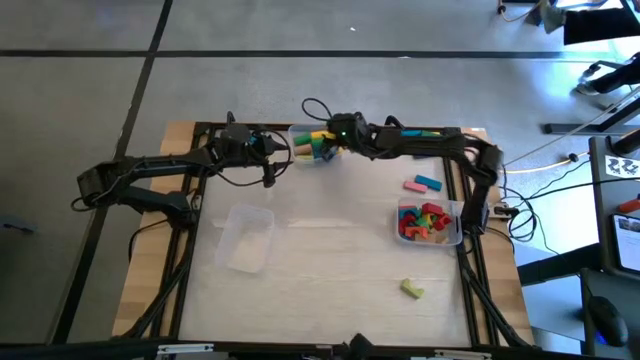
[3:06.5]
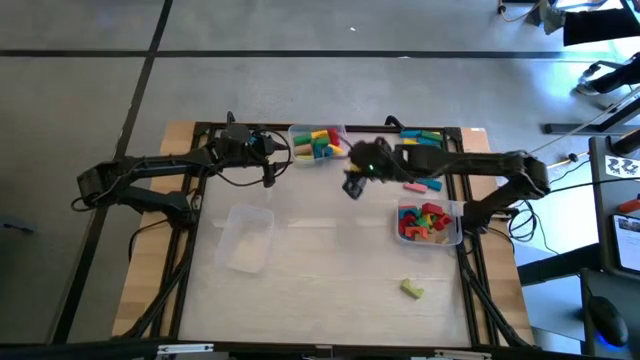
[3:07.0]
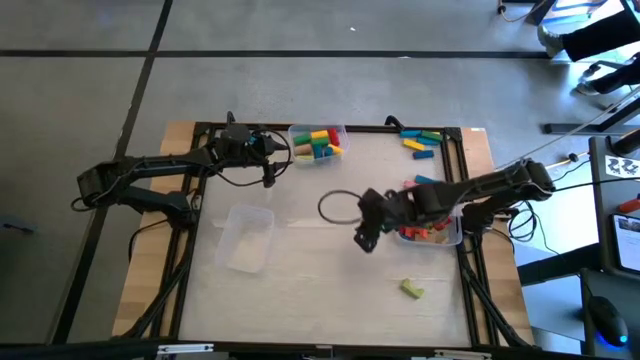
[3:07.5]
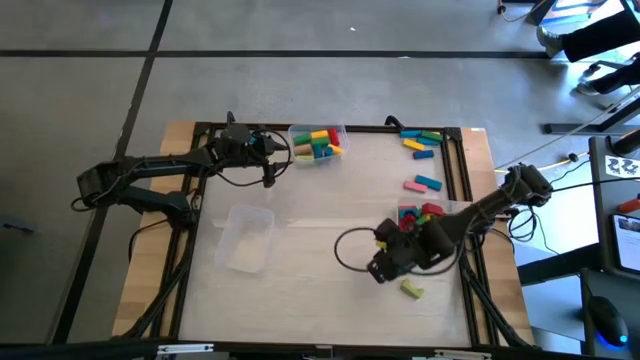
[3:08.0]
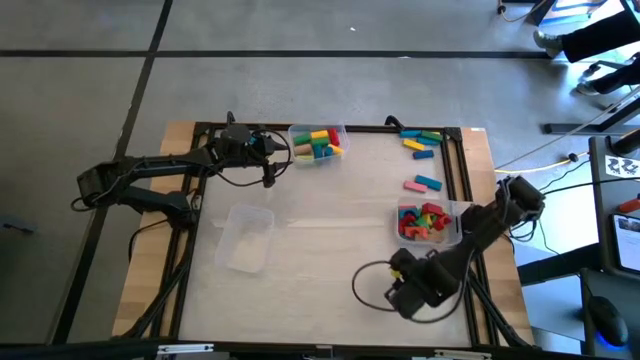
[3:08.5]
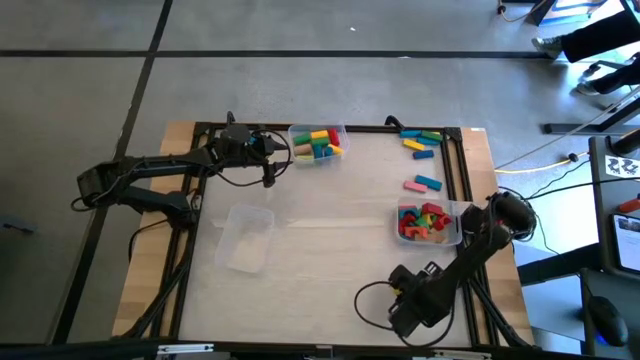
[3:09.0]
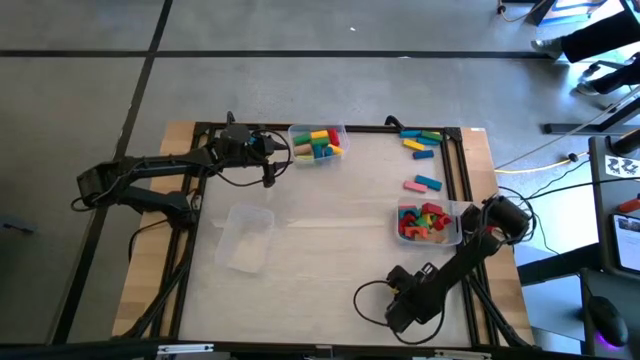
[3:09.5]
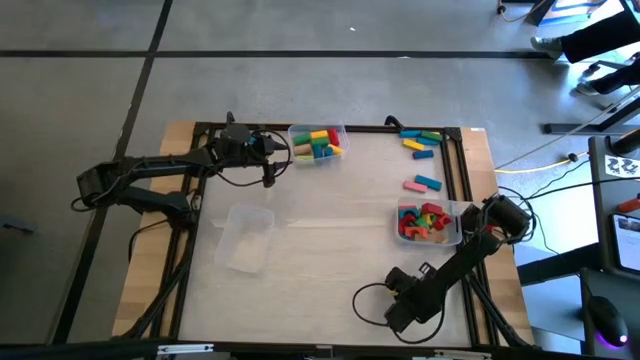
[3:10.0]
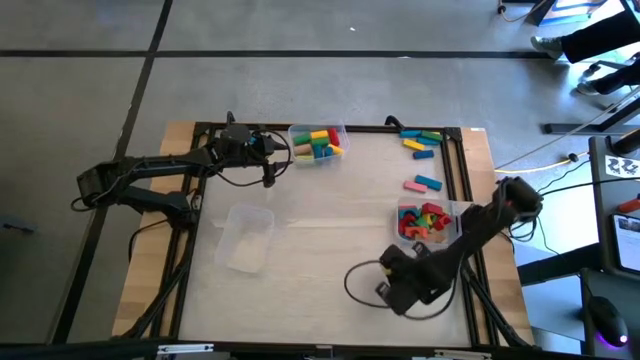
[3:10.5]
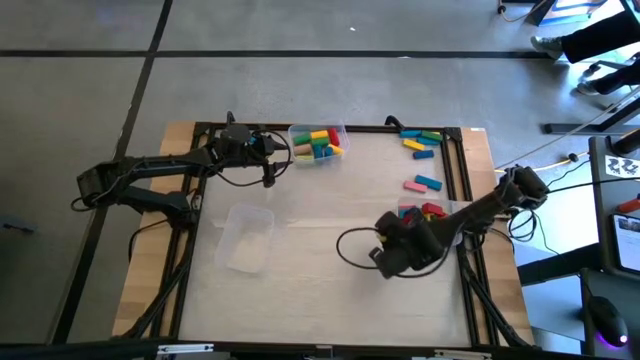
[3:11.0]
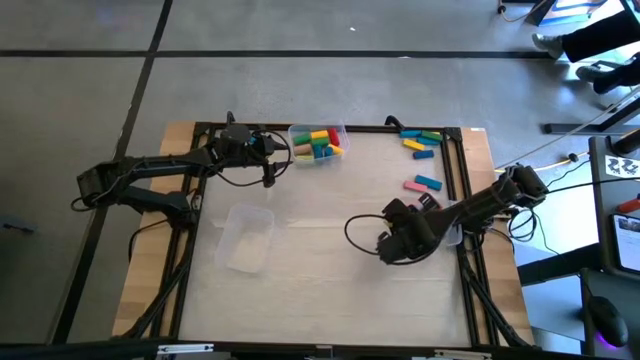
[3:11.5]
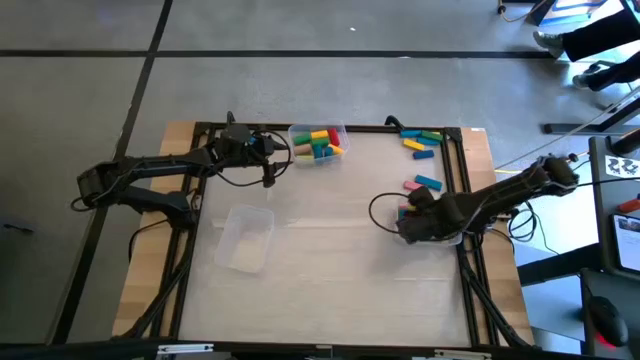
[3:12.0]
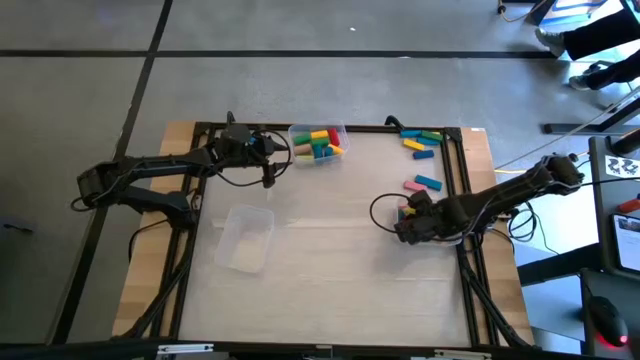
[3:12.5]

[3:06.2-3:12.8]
Task: Sort blocks by size
Put the light green arch block into the bottom right transparent bin

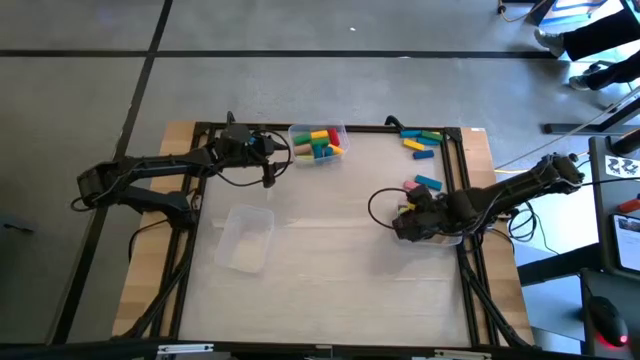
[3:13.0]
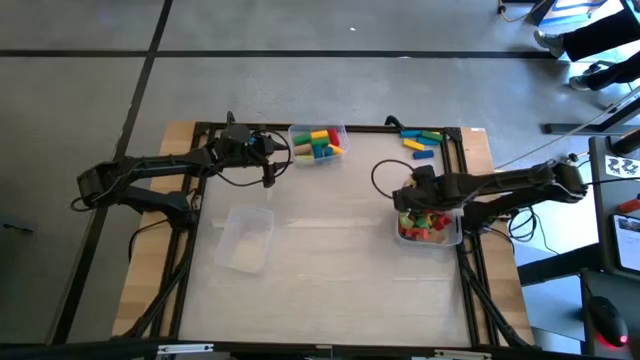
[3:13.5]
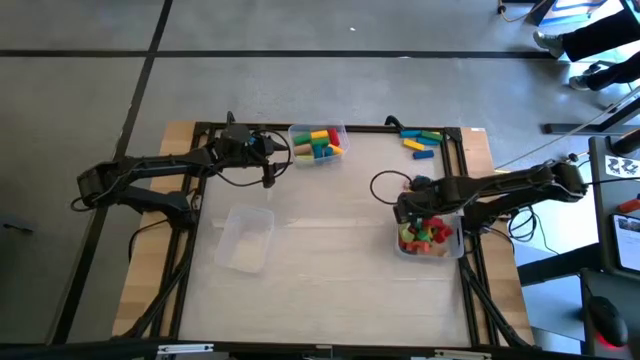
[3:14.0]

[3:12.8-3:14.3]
Adjust the bottom right transparent bin

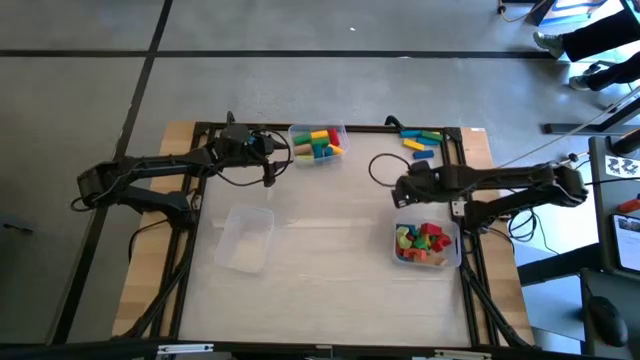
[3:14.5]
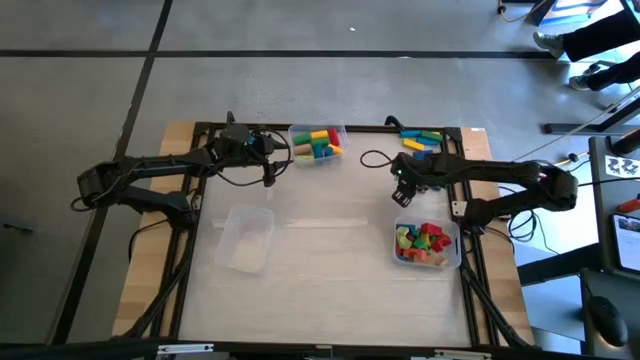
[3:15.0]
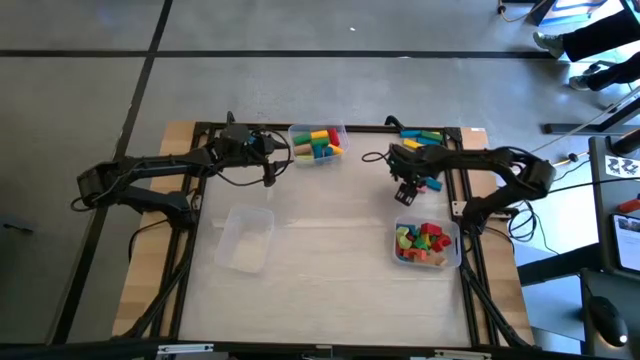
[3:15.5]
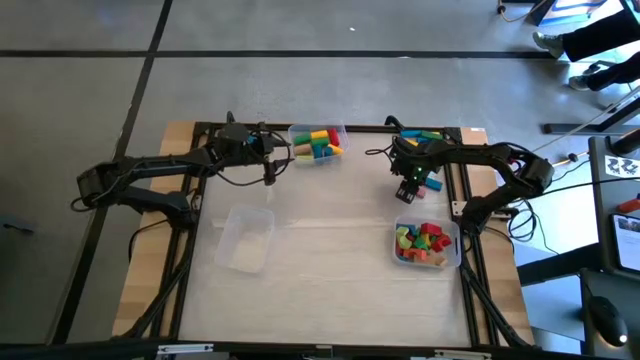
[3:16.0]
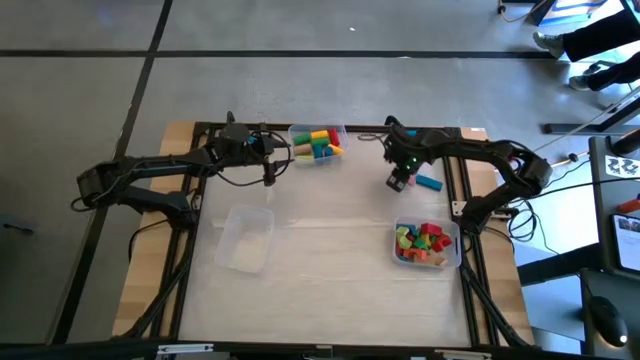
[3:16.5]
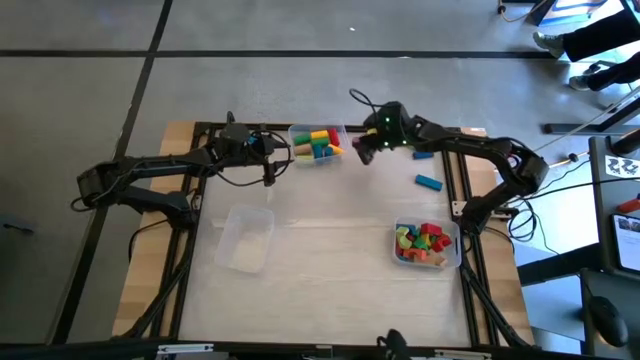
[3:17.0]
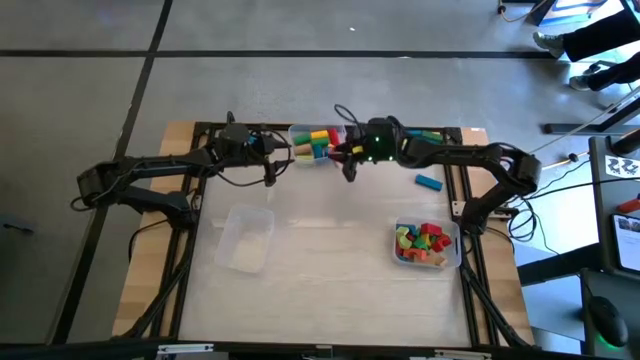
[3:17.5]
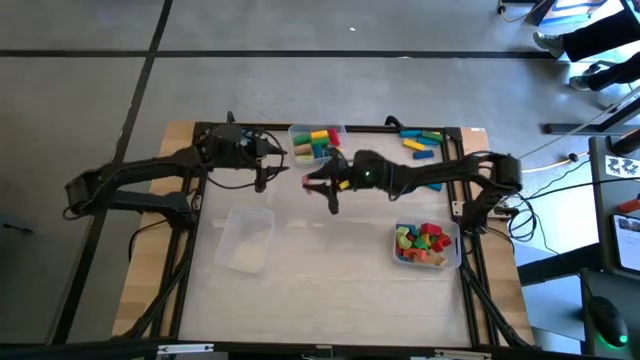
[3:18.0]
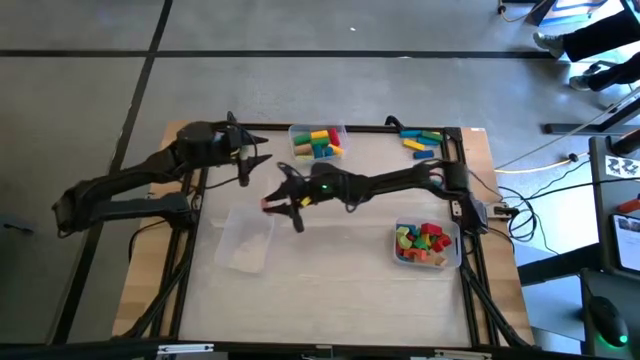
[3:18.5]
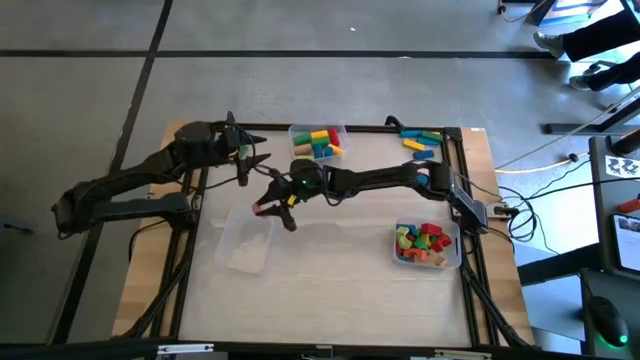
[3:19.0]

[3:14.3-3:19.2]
Put the pink rectangular block into the bottom left transparent bin

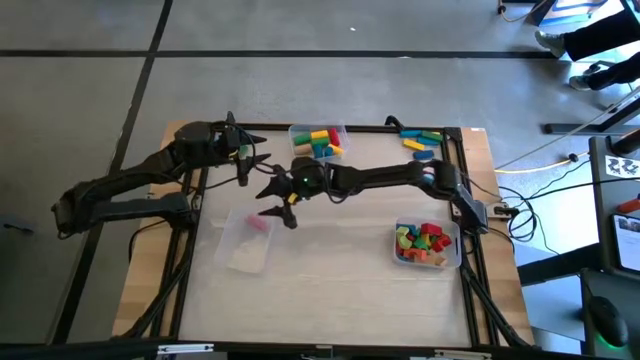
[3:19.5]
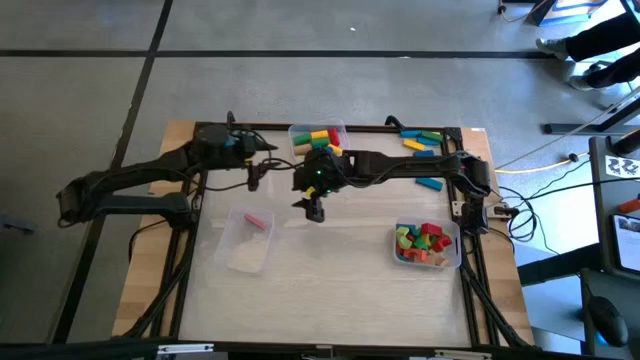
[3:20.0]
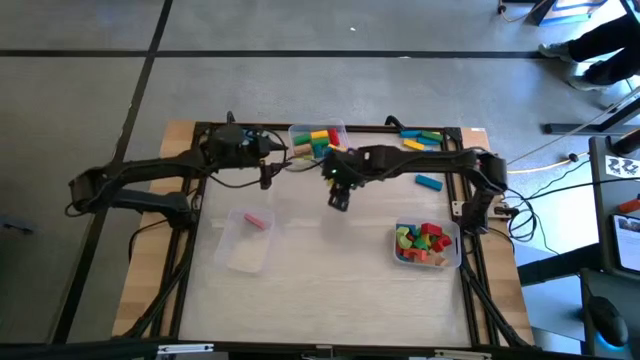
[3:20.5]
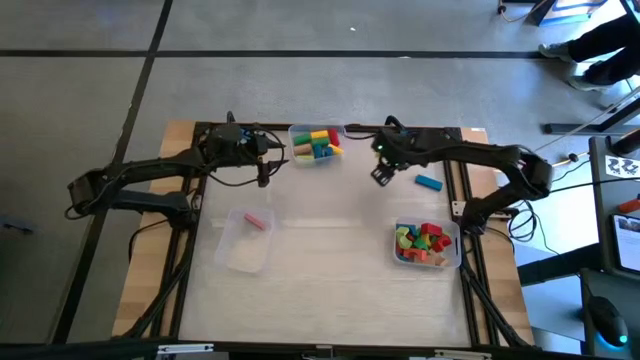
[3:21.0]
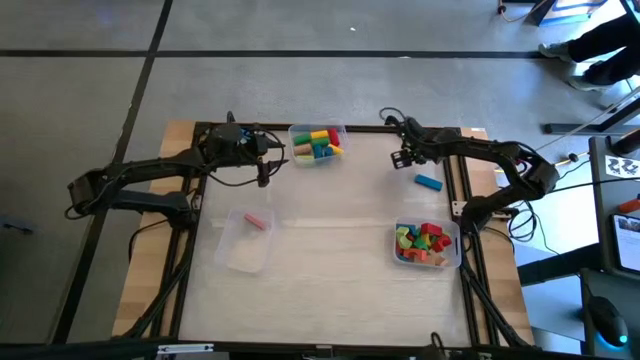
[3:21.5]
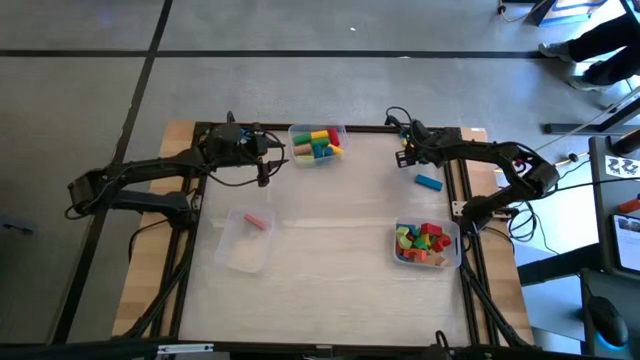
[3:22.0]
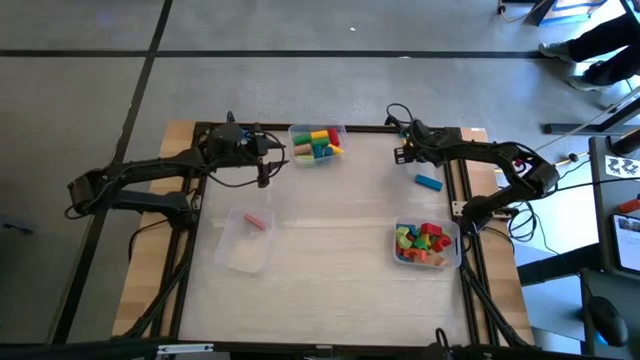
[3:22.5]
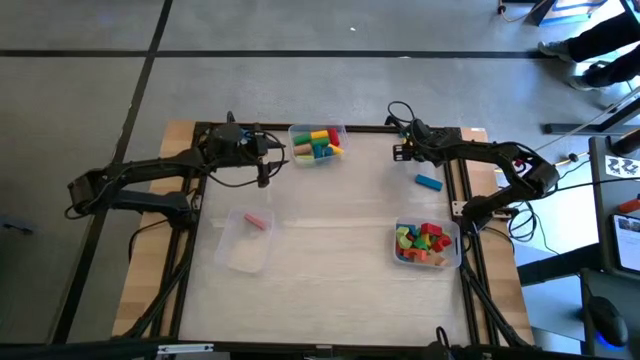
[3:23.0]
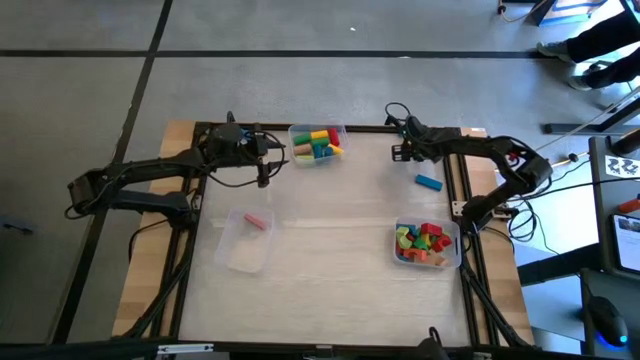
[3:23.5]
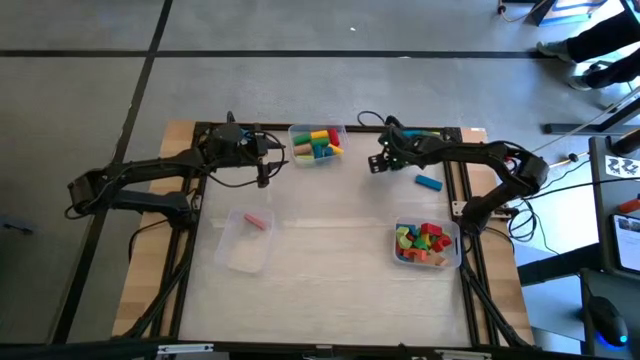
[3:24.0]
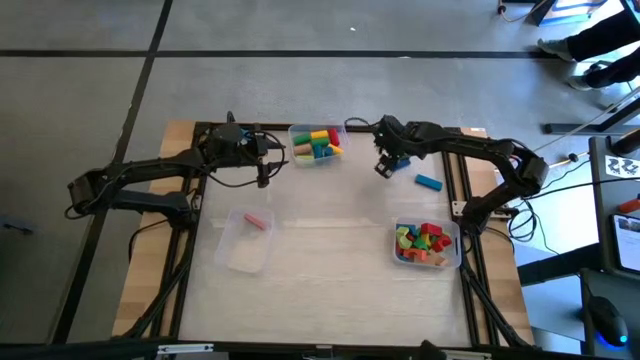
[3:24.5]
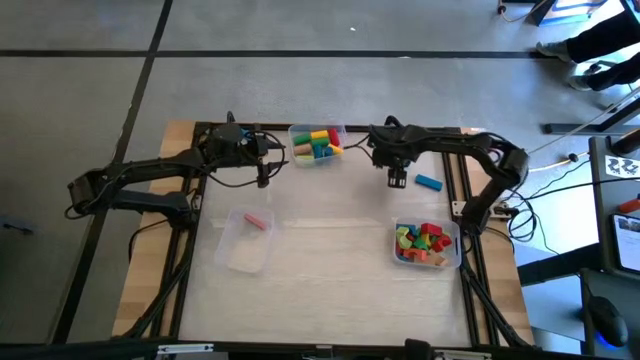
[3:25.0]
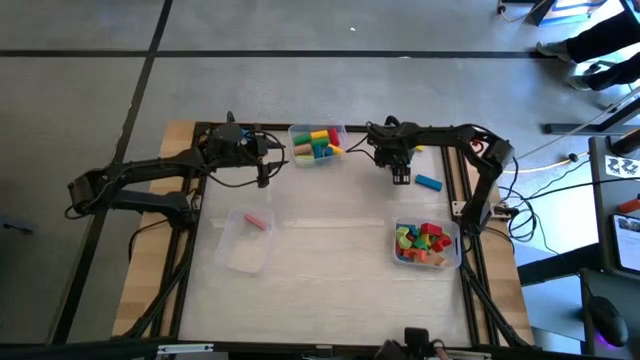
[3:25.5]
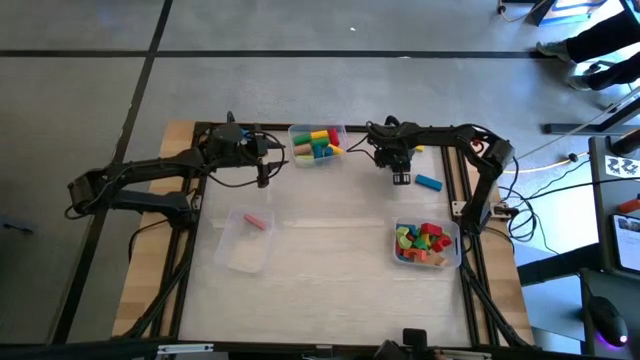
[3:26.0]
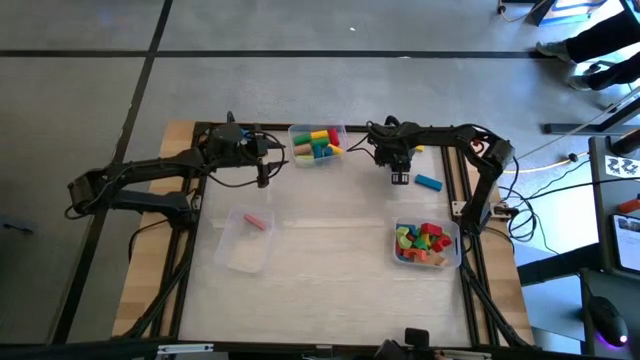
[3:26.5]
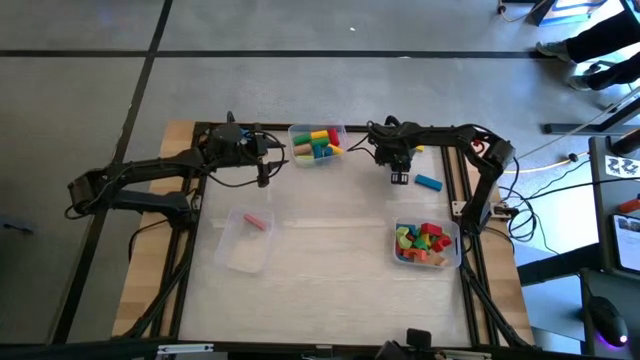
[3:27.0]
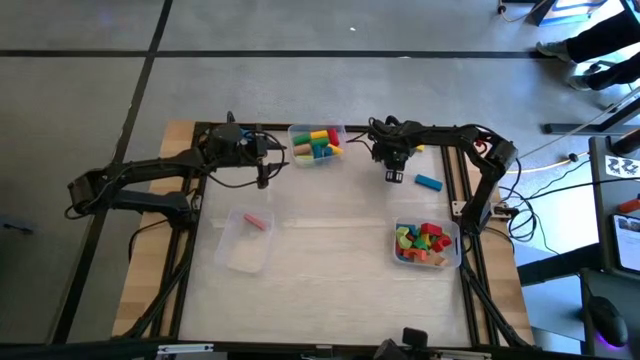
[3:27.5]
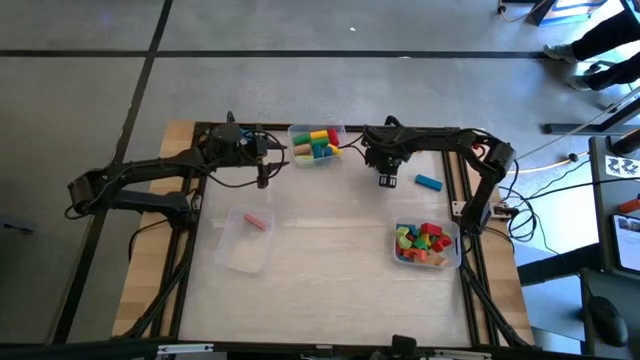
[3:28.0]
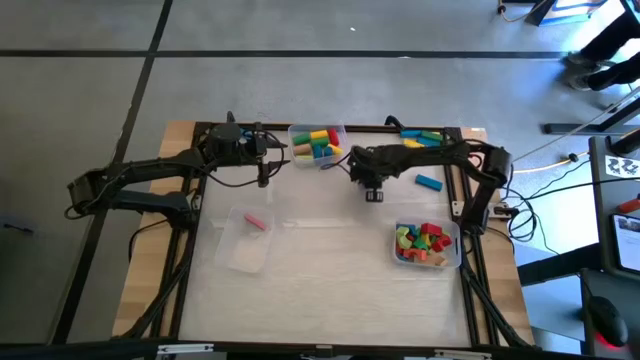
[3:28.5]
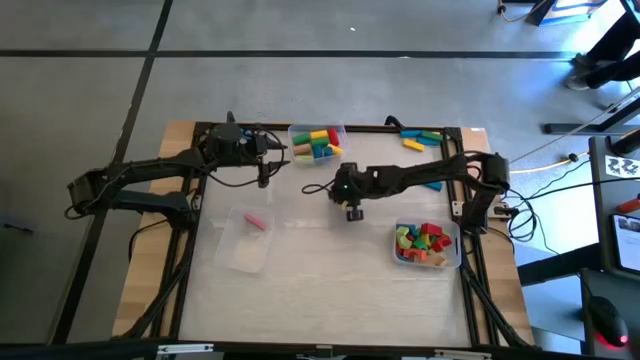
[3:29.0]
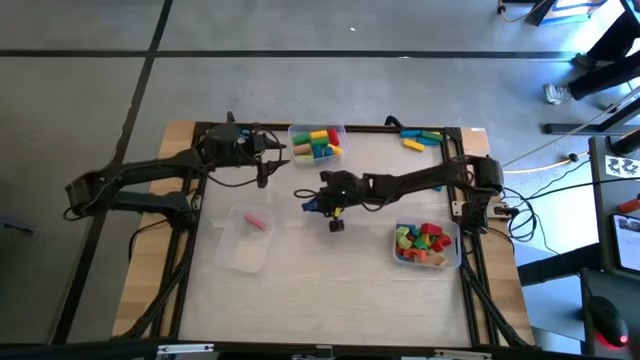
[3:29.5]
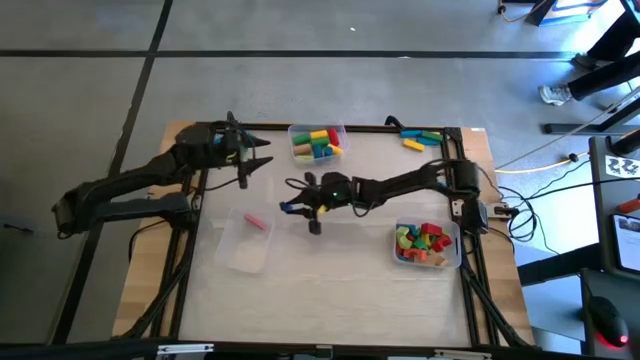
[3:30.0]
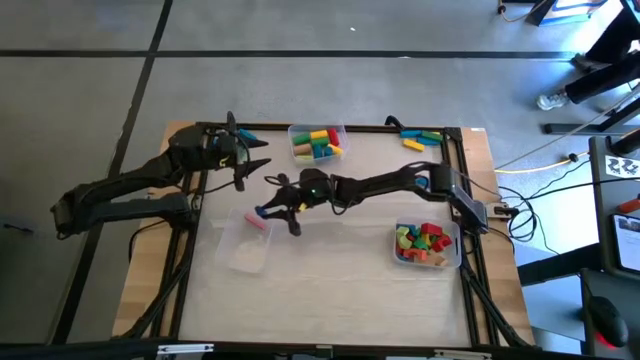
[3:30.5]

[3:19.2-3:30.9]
Put the blue rectangular block into the bottom left transparent bin
